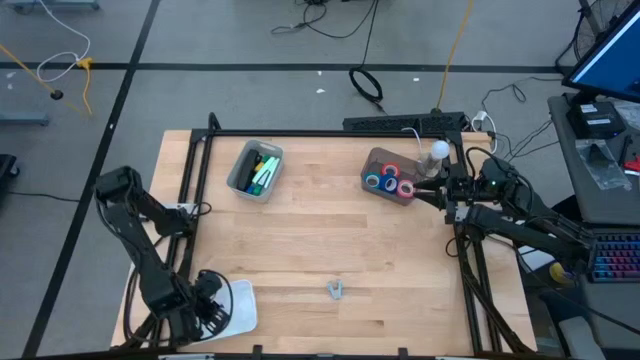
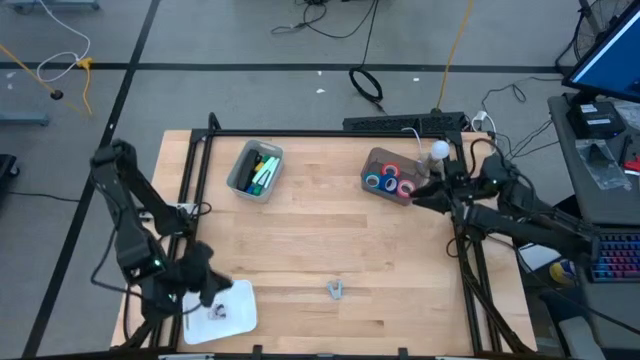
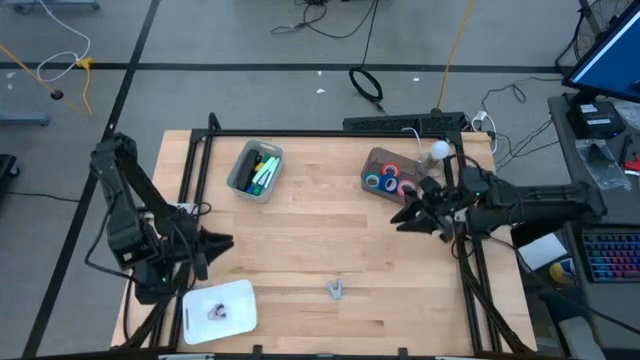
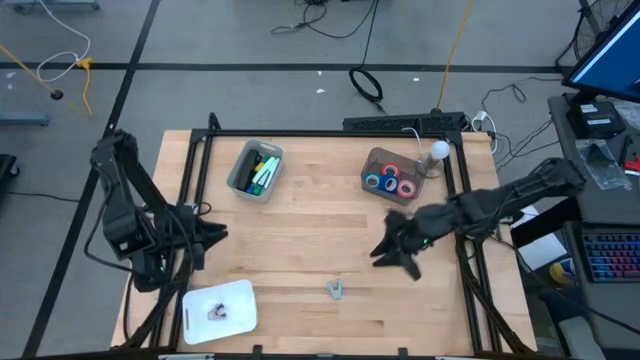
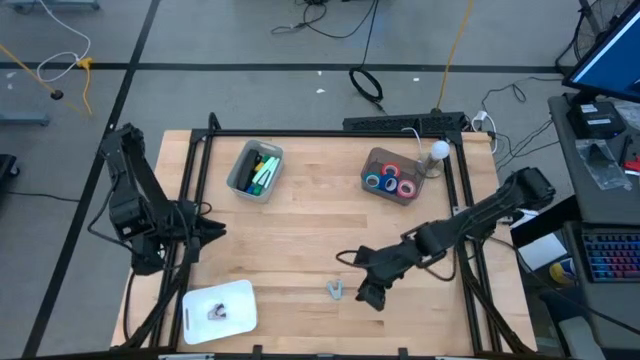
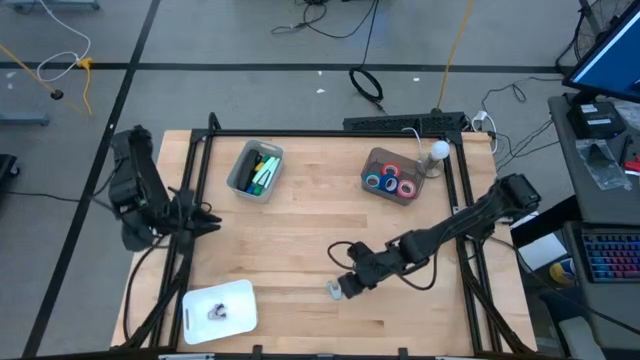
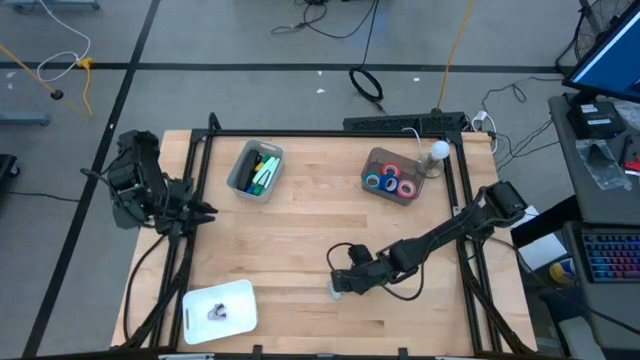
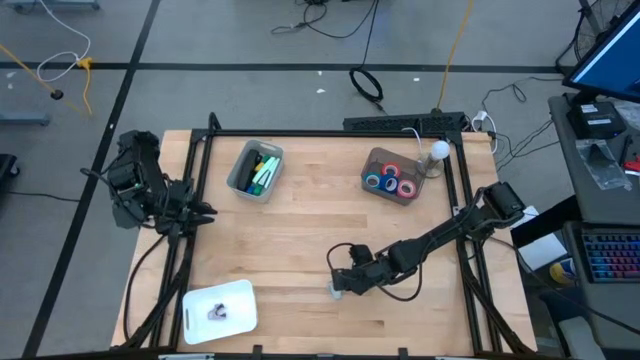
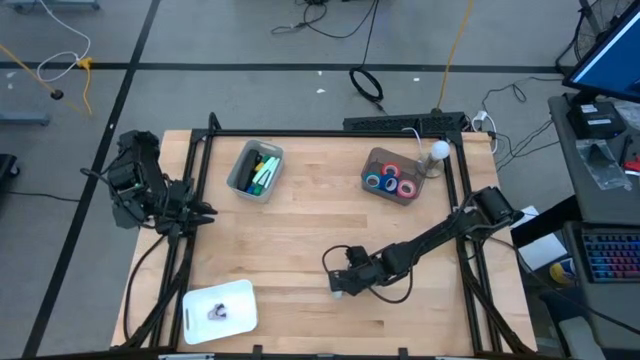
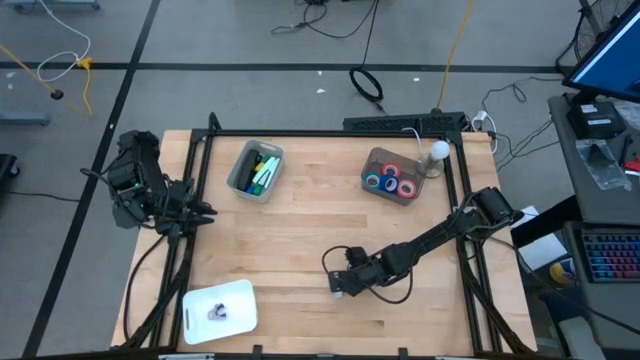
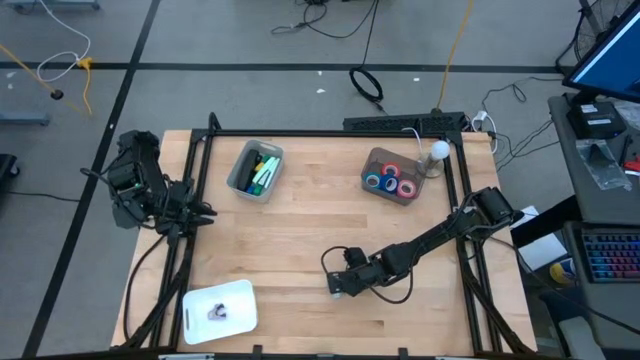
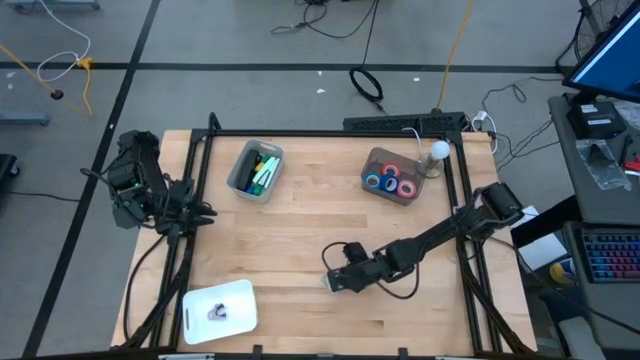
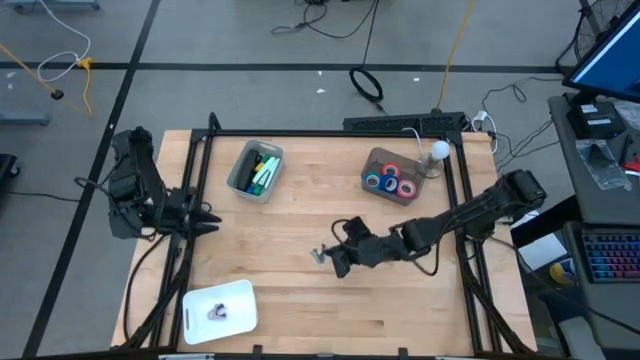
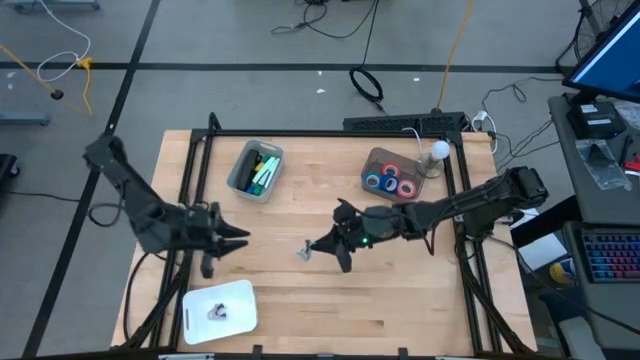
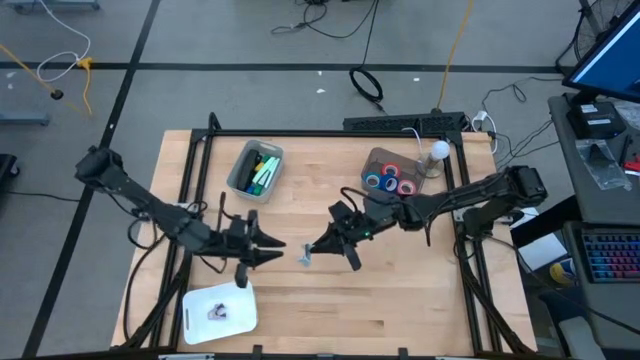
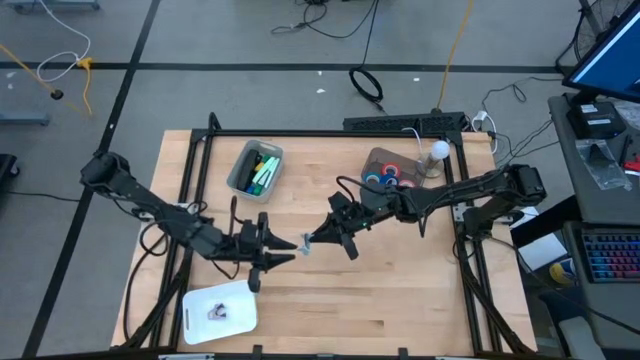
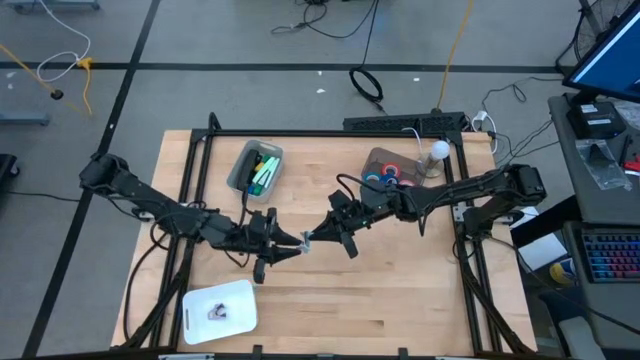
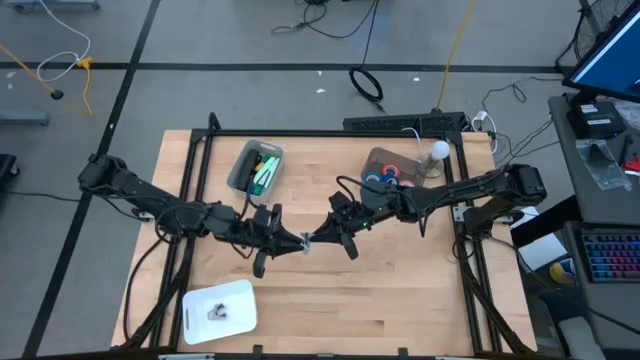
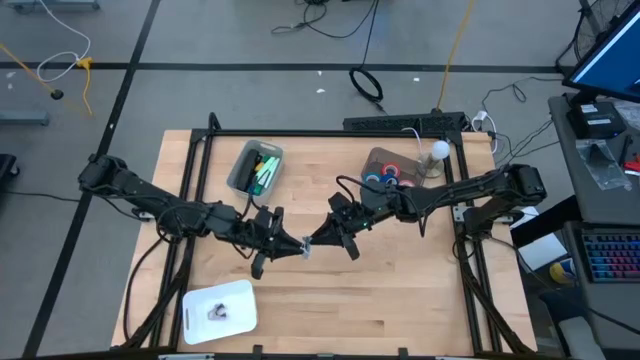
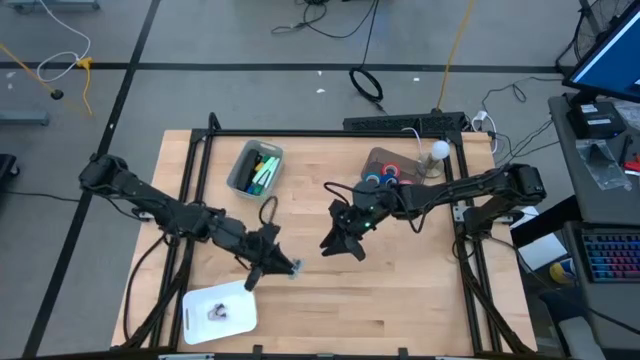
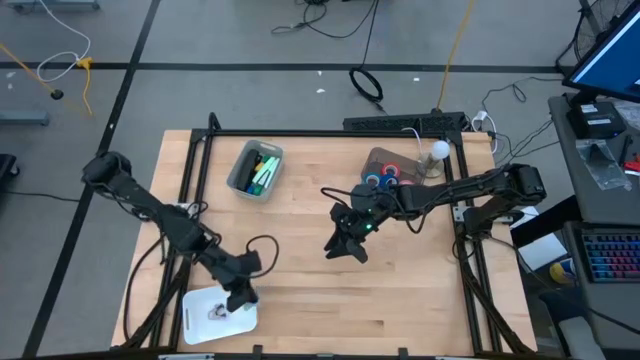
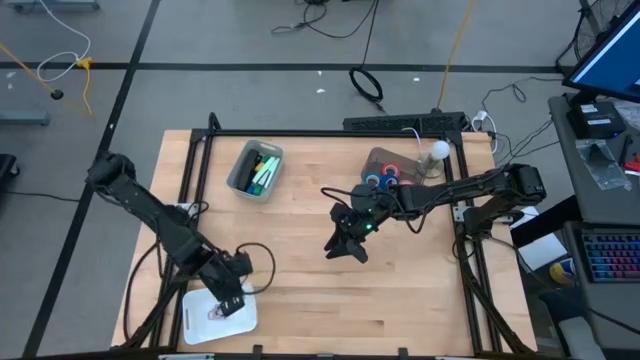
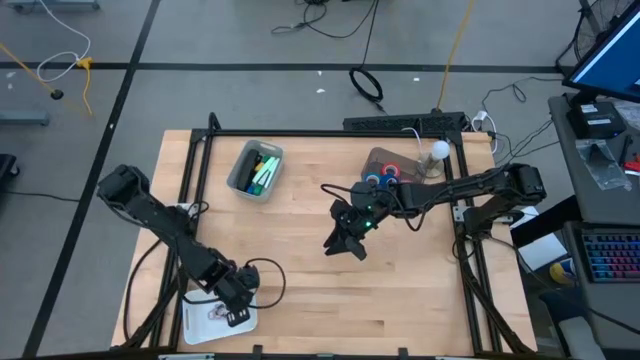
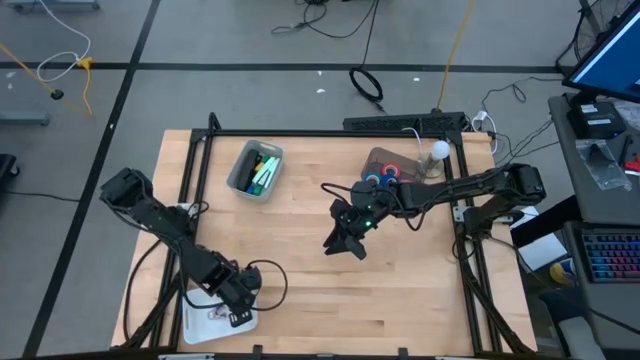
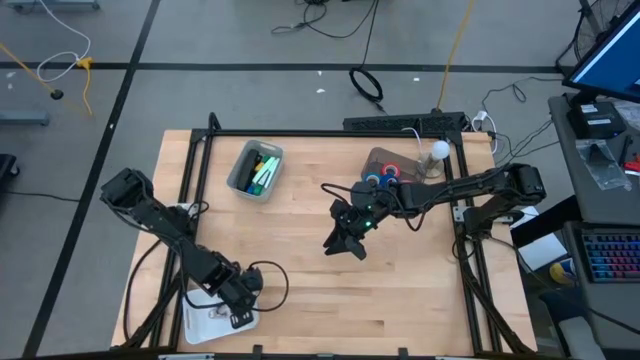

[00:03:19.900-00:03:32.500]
Task: Pick and place Stapler, Stapler remover, tape
Put the light blue staple remover into the white bin

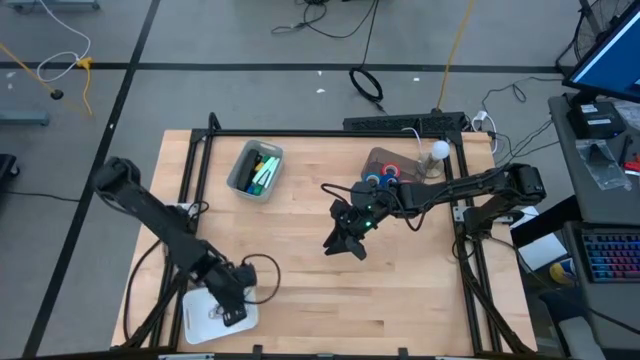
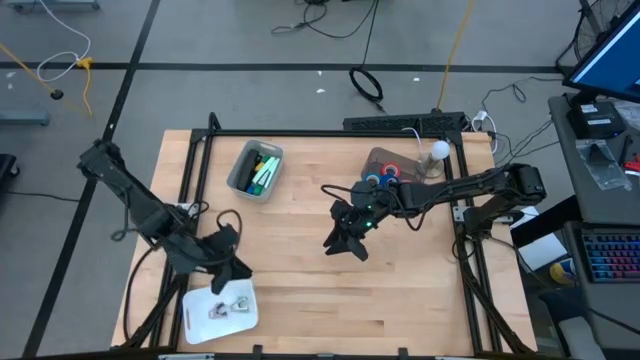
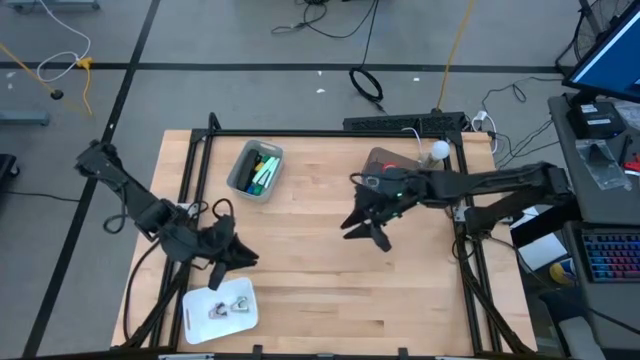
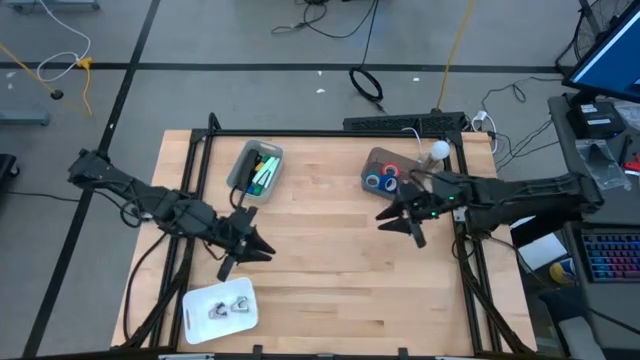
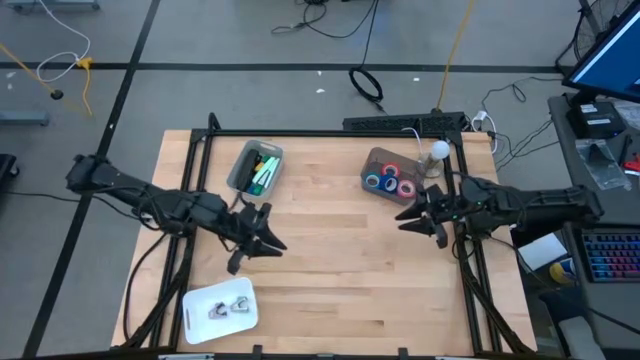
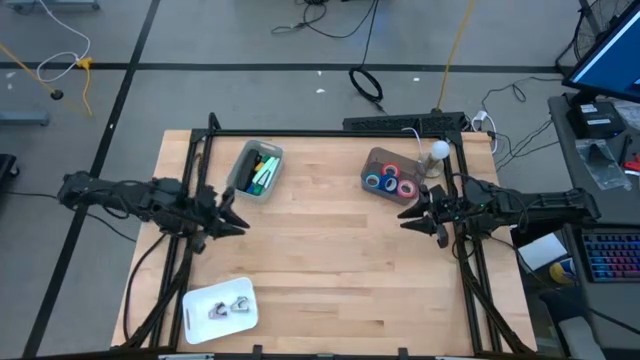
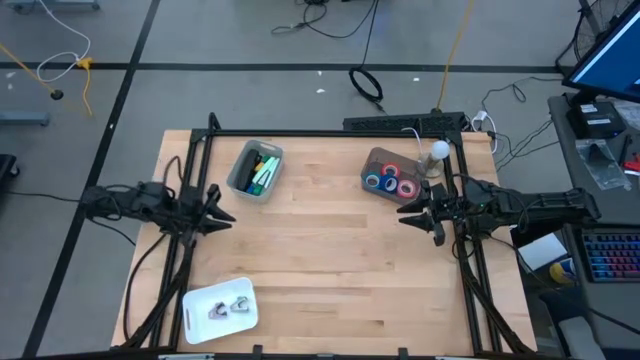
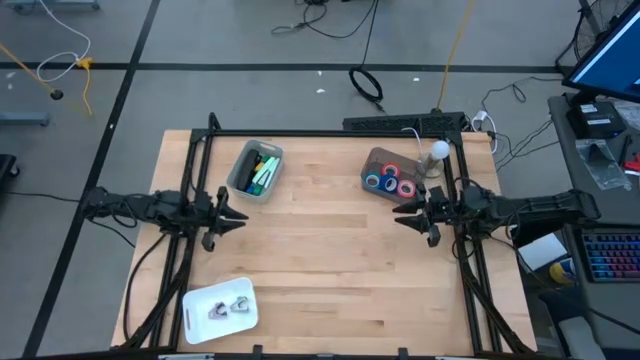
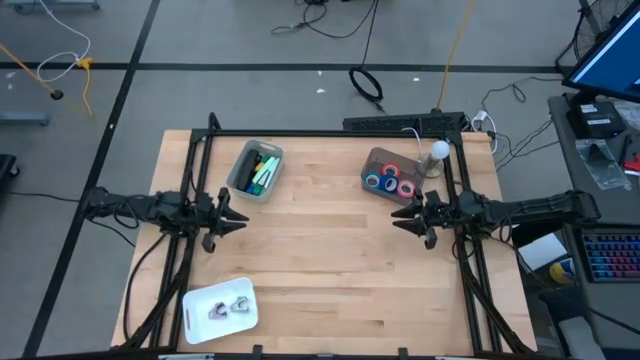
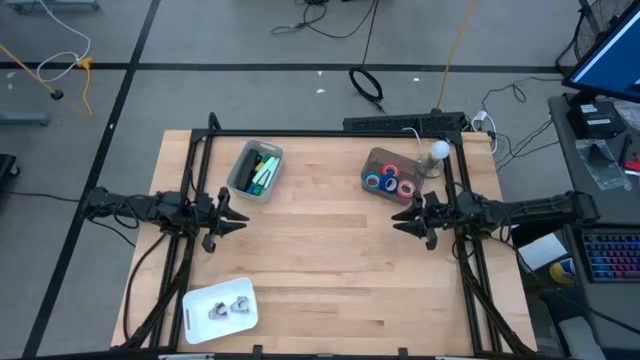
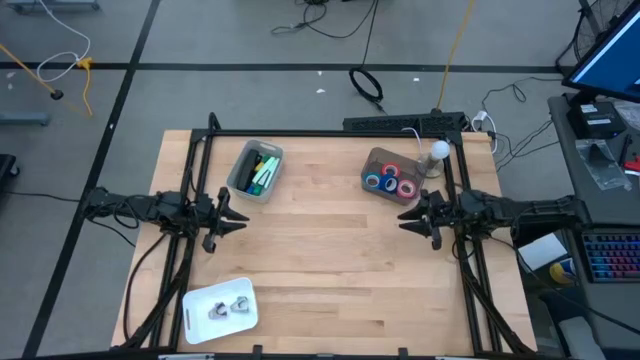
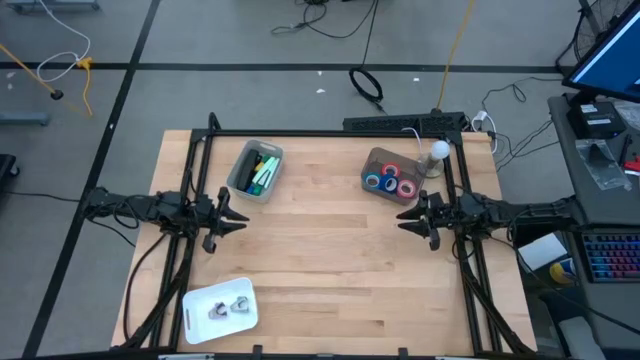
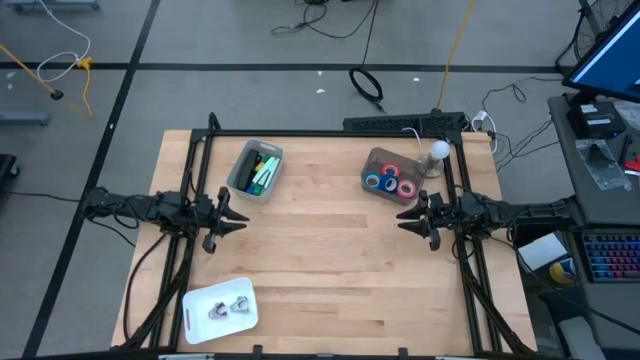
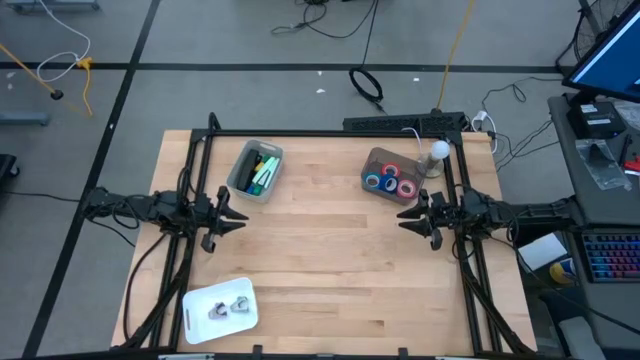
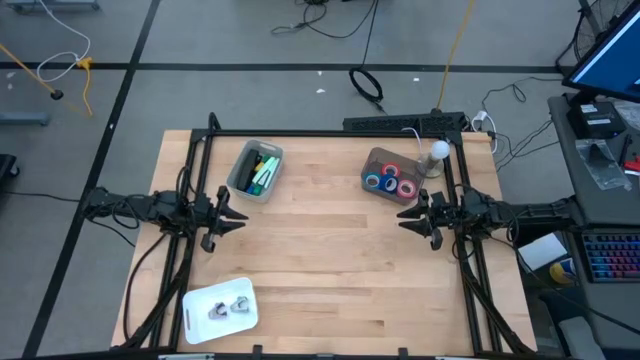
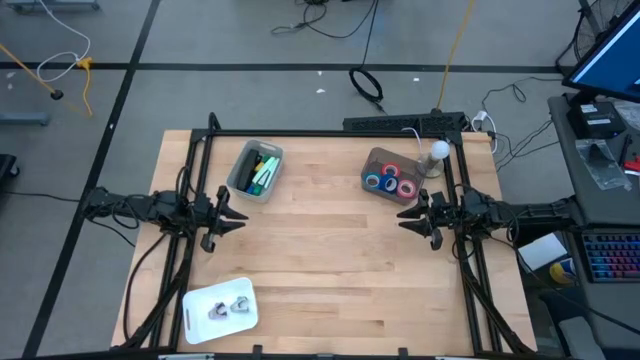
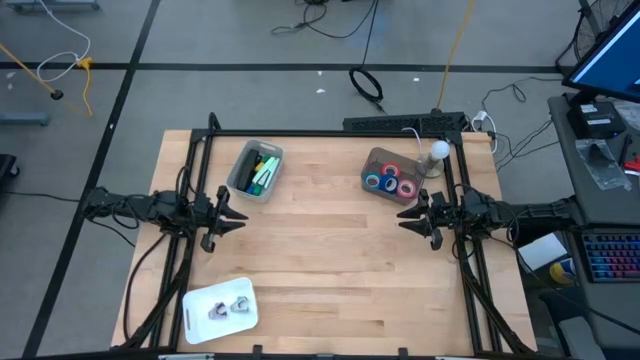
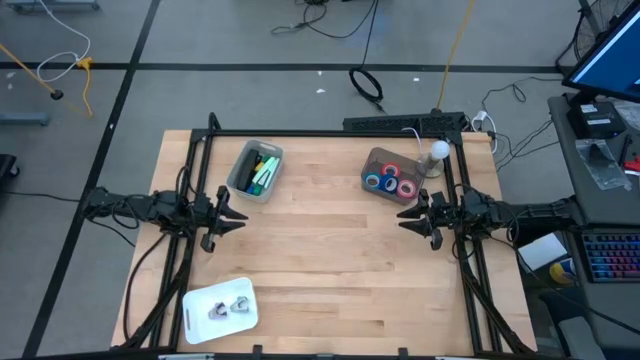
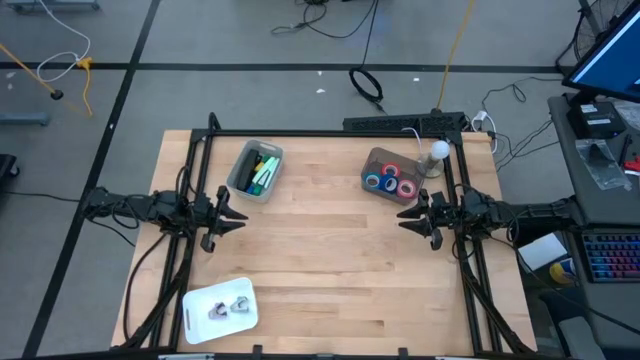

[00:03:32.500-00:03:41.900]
Return to Home Position
